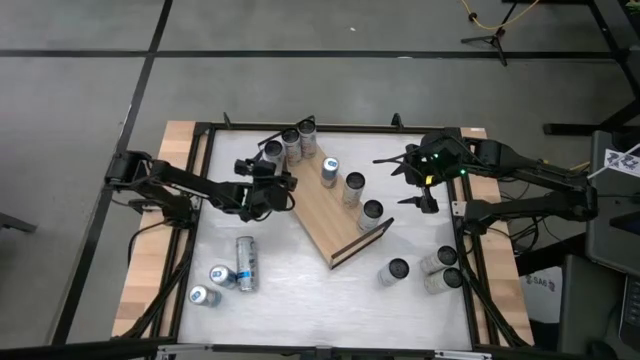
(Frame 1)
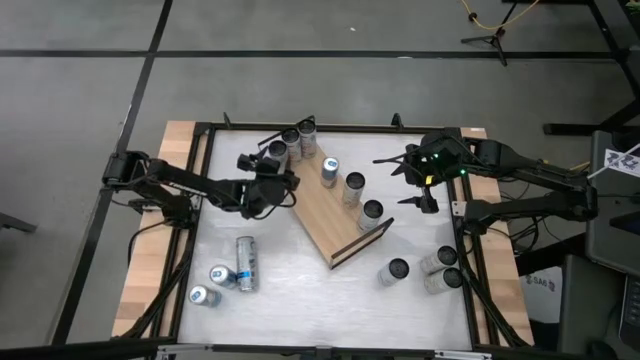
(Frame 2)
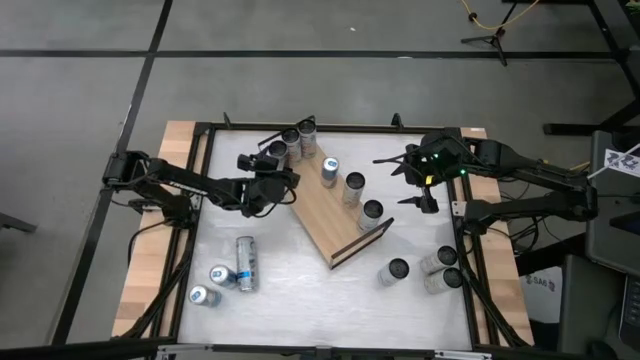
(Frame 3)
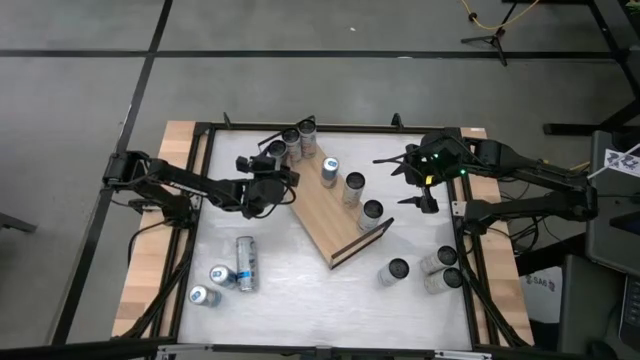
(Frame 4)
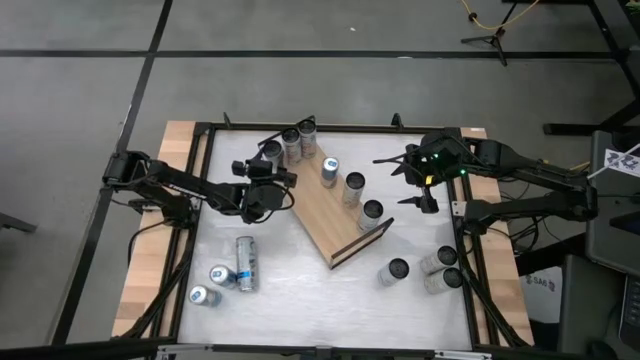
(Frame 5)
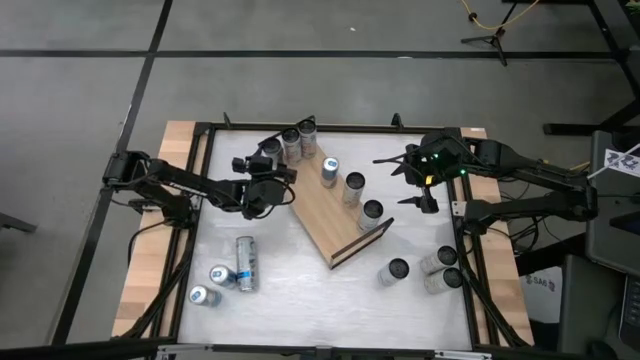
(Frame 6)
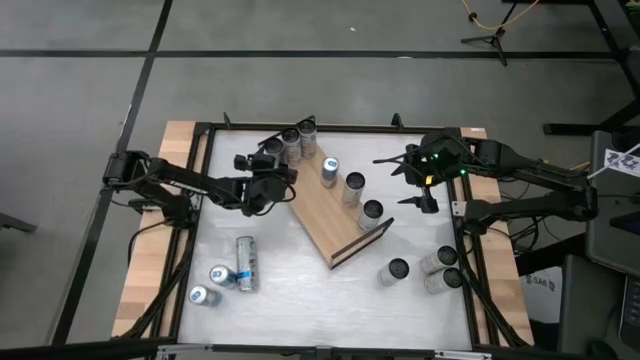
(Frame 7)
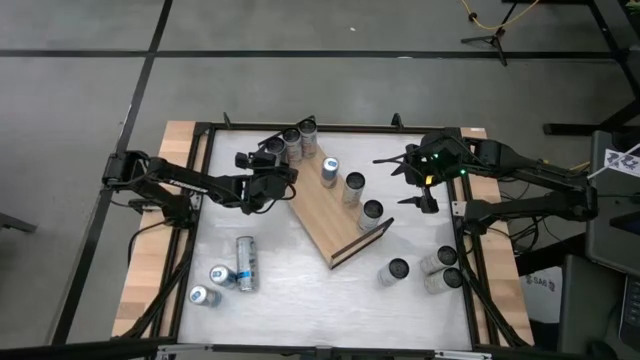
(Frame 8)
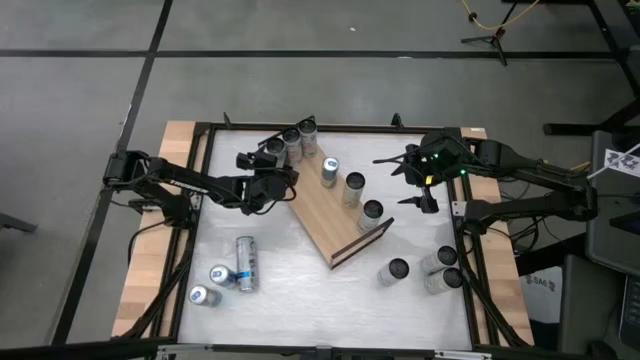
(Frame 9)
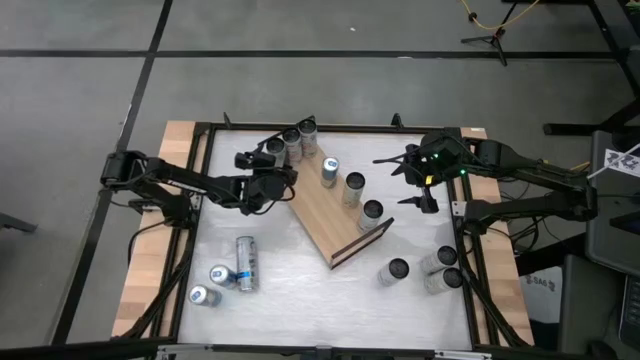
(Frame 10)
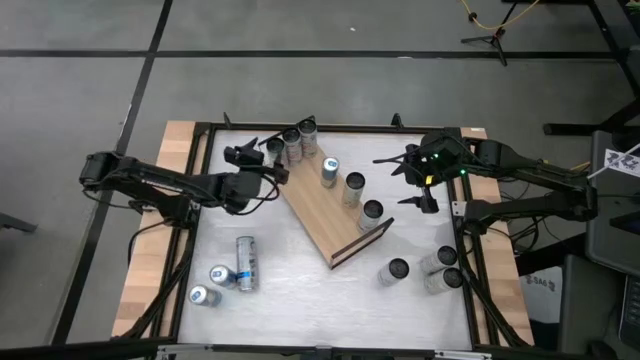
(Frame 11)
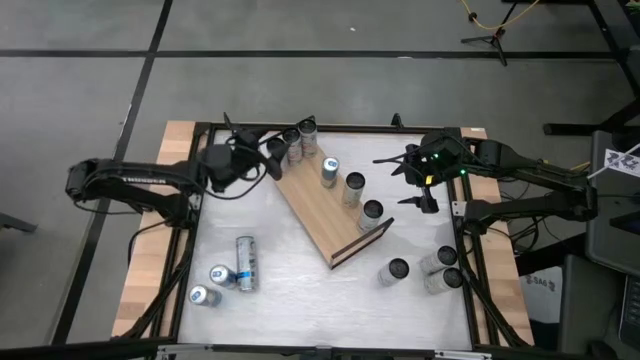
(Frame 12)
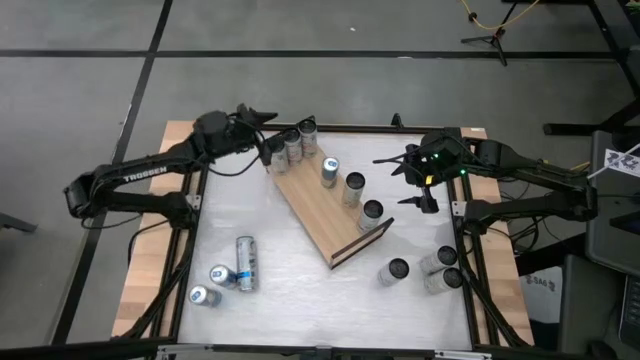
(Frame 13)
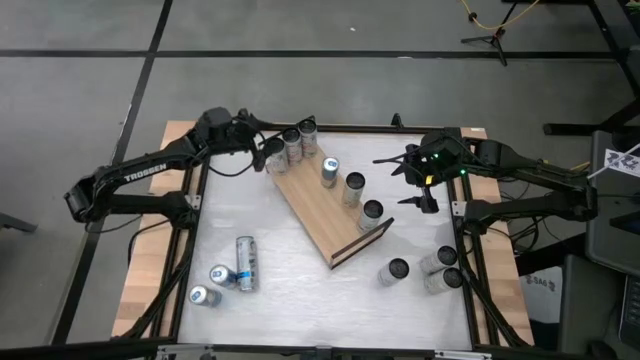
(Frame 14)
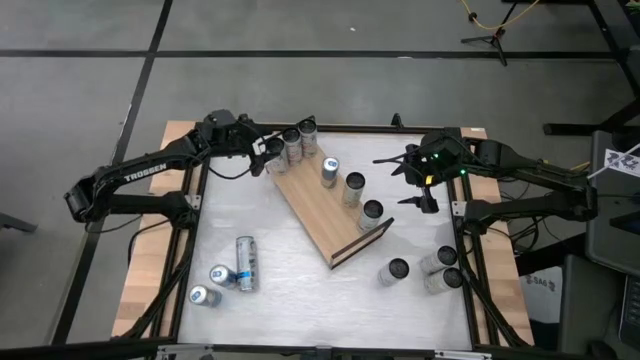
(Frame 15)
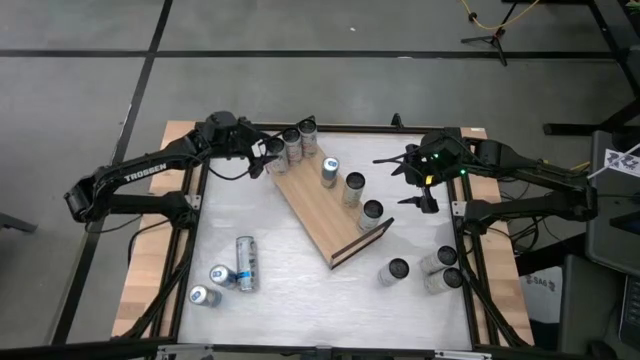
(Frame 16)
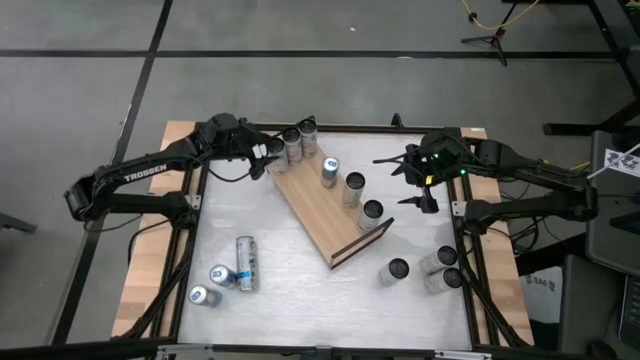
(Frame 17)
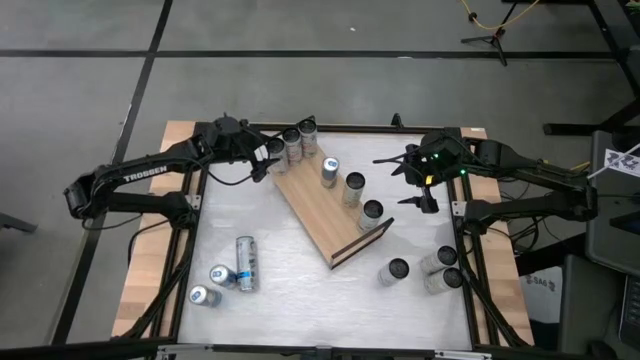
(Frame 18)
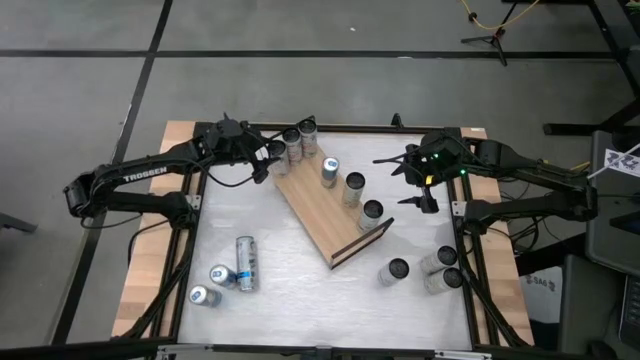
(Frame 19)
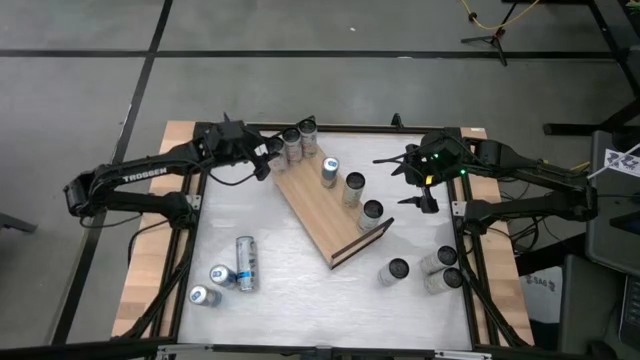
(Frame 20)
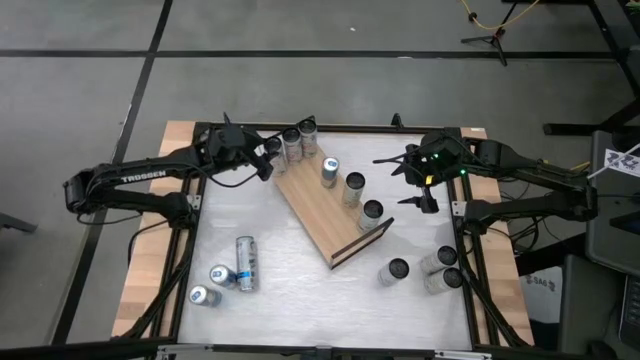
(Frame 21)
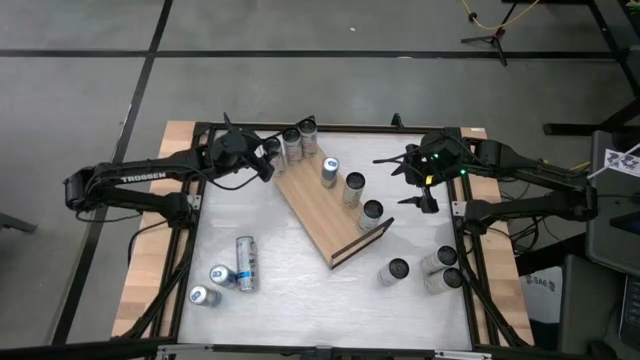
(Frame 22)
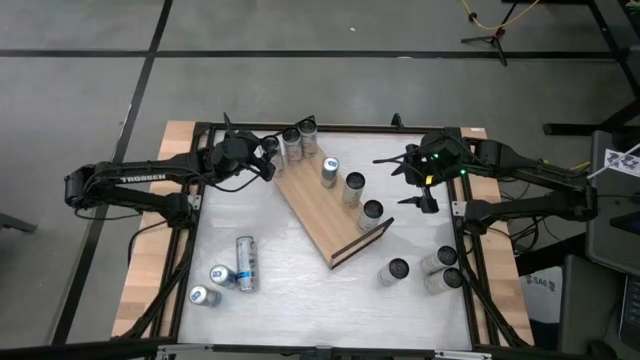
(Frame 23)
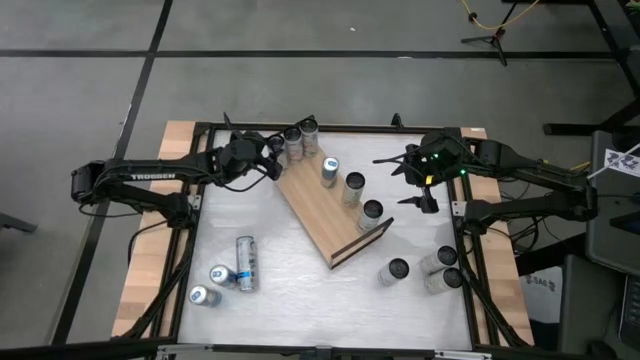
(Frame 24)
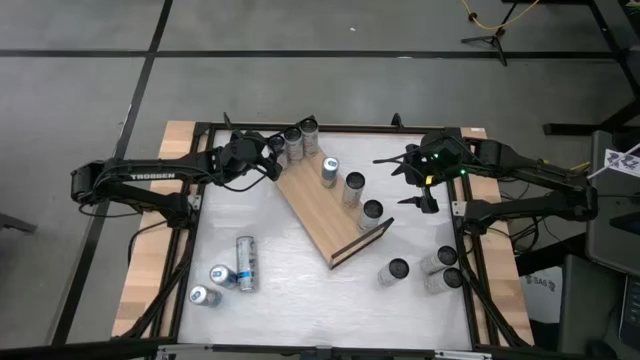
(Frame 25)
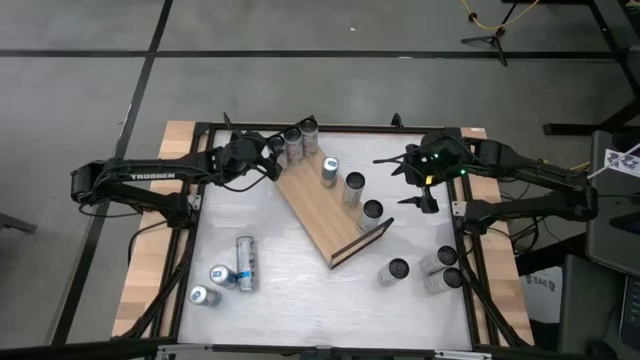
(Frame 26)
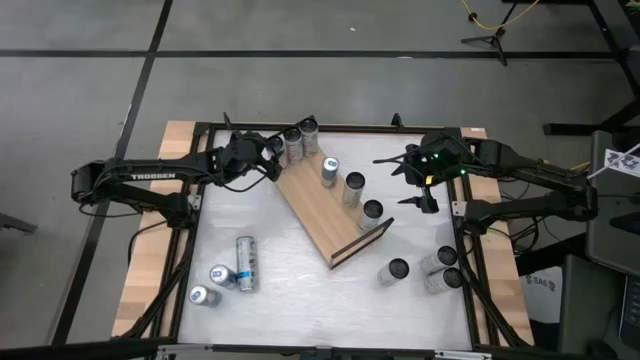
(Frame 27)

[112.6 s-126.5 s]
Task: Place canned beverage on shelf
Put the white-pink soda can on the shelf and align with the other white-pink soda can

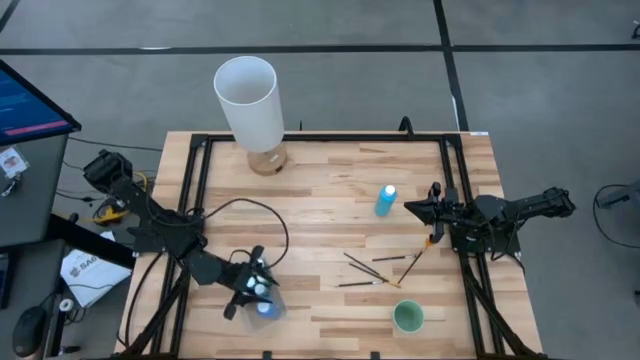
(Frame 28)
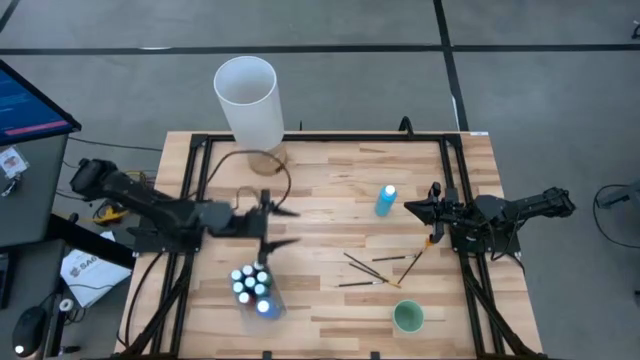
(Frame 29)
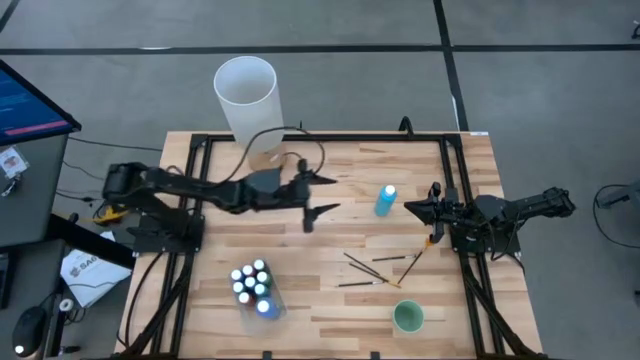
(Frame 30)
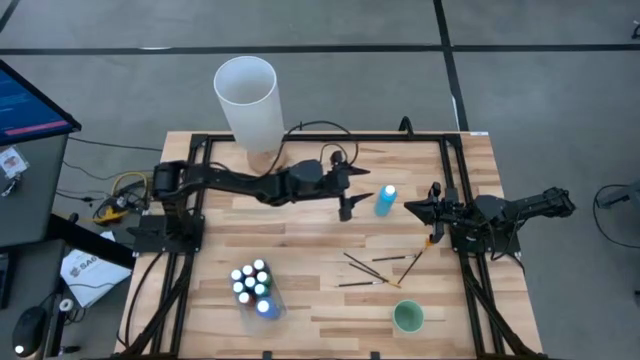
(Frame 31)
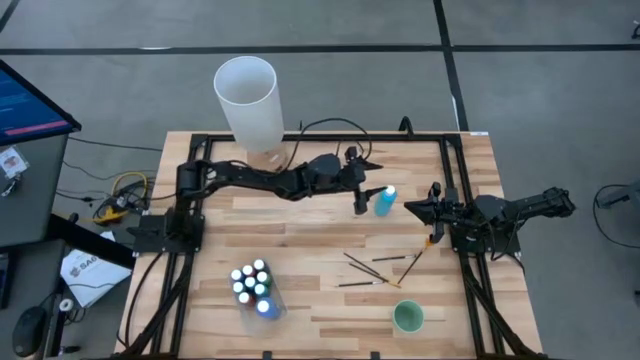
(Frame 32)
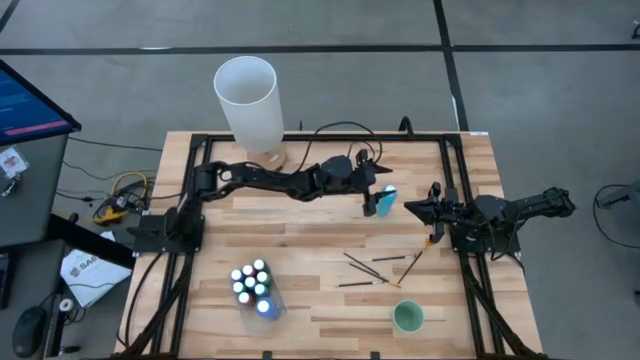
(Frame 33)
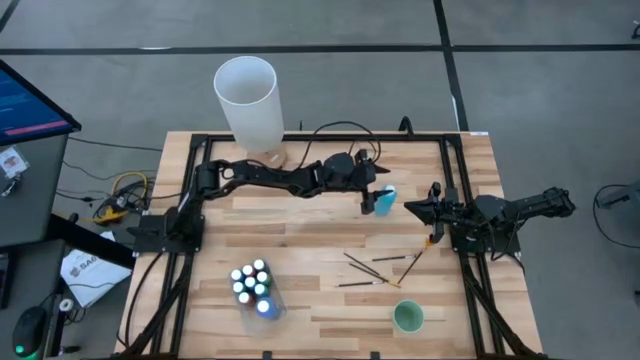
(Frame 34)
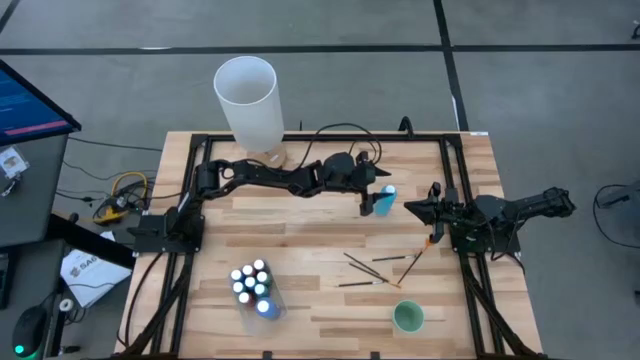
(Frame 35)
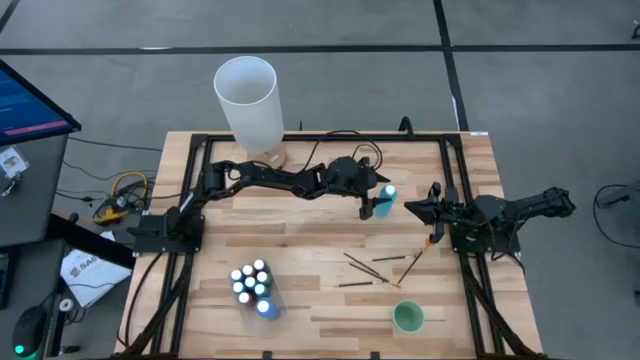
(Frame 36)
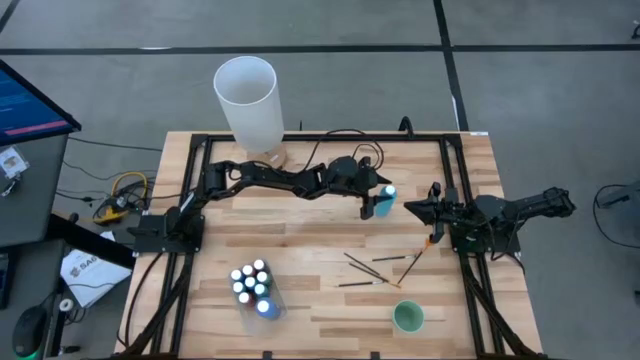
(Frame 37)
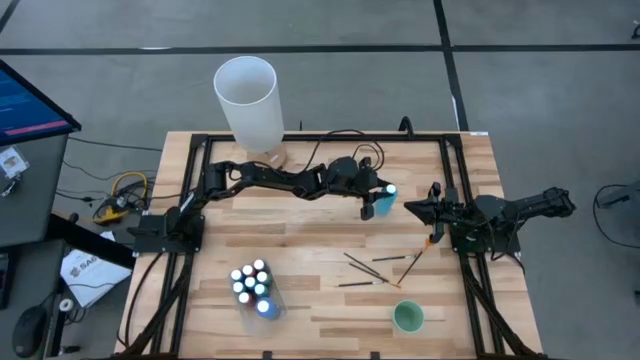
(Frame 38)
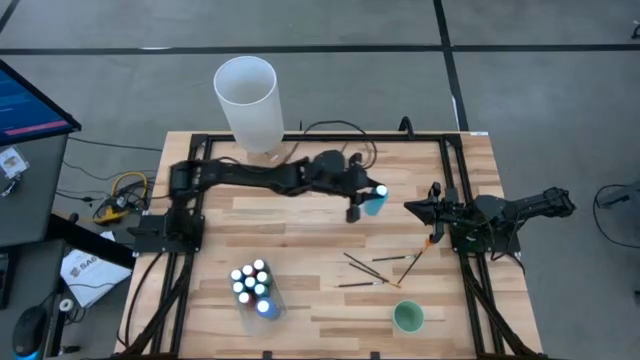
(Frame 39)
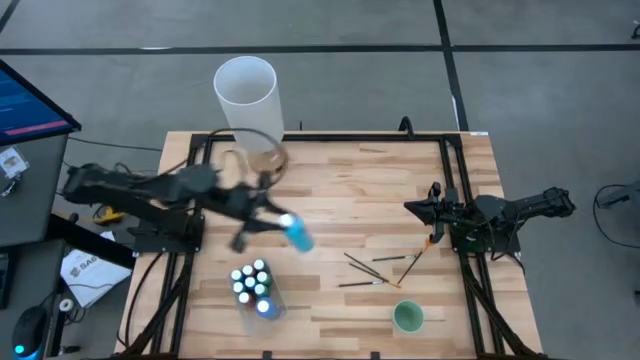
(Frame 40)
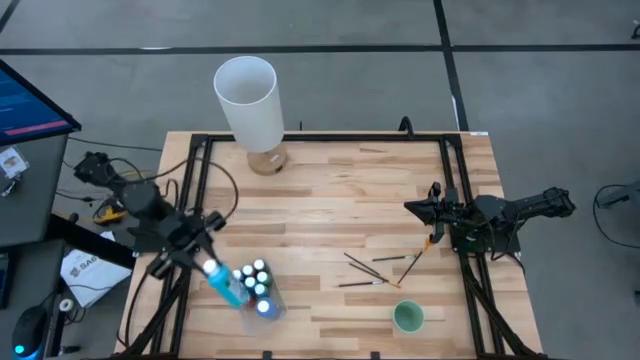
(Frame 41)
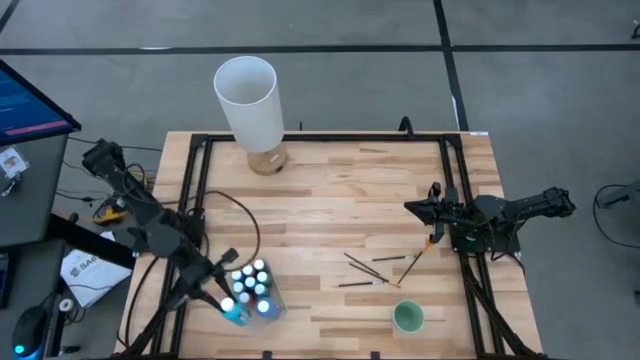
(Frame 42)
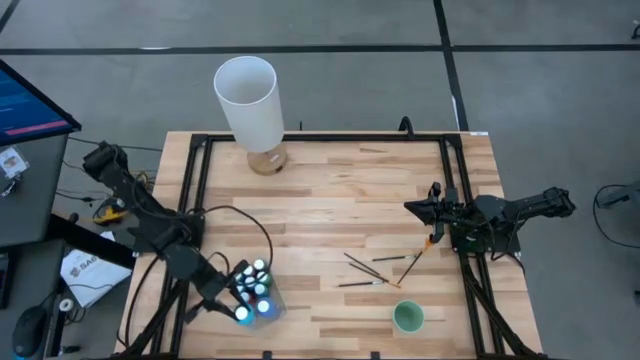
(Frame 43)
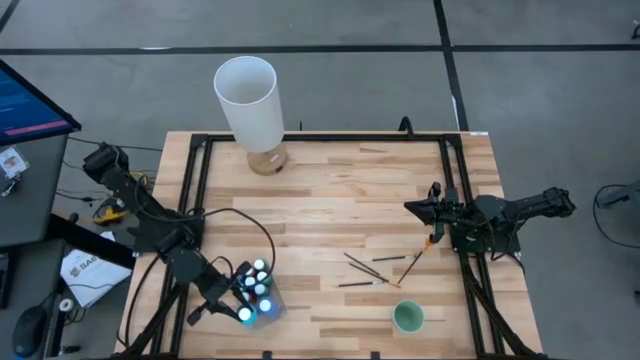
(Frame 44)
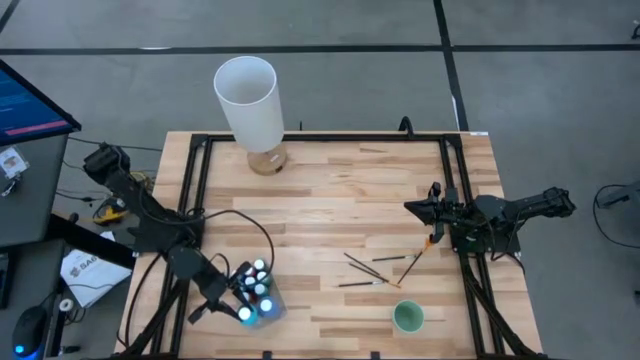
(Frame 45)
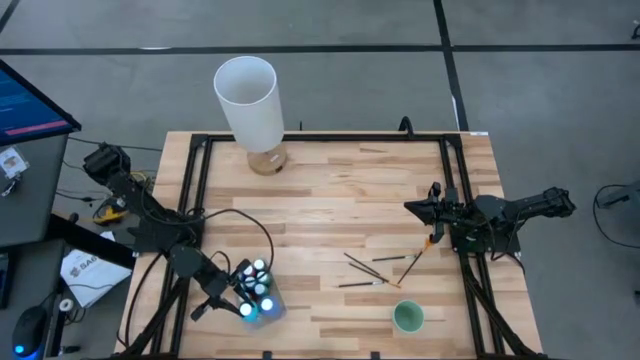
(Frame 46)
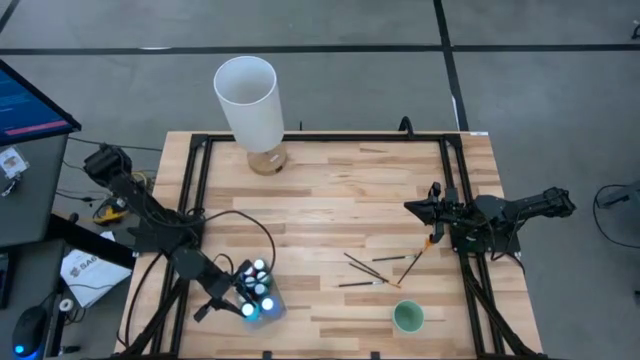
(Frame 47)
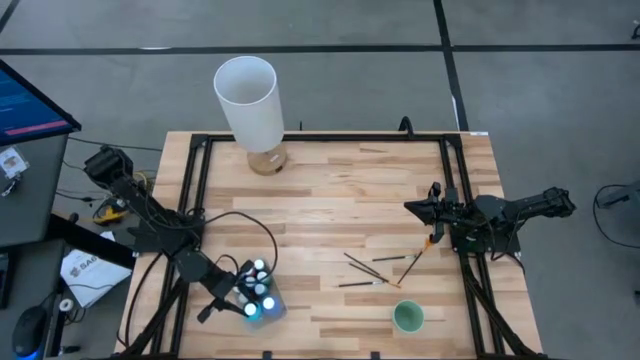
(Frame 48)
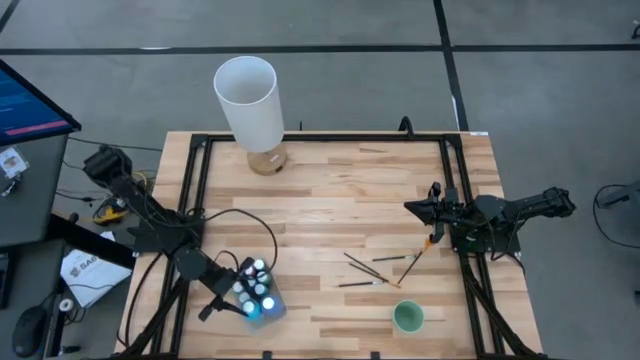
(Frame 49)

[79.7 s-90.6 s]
Task: Pick & Place Paint Supplies
Put the large light blue paint bottle into the transparent bin
